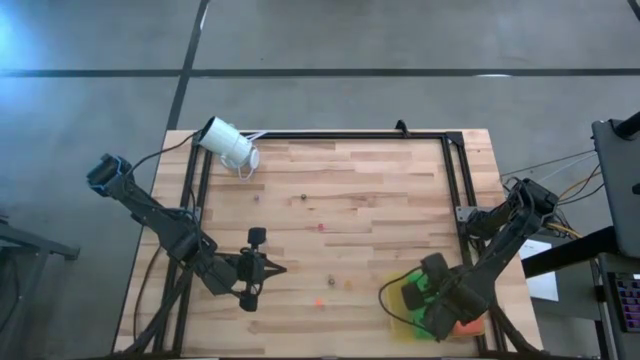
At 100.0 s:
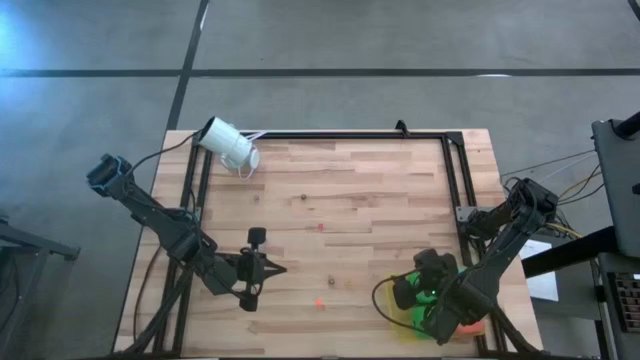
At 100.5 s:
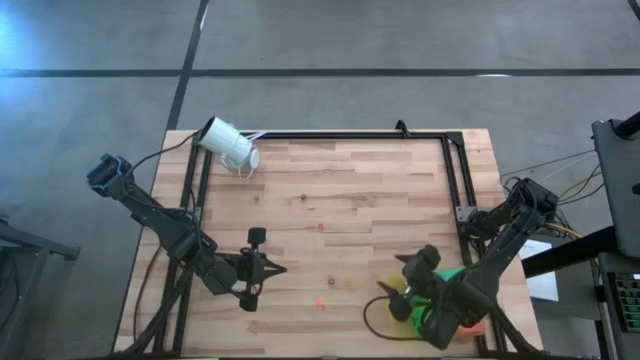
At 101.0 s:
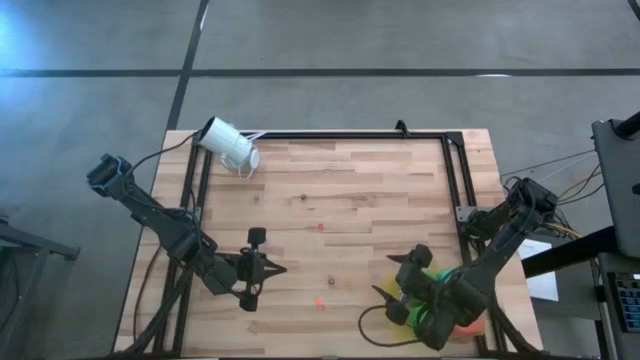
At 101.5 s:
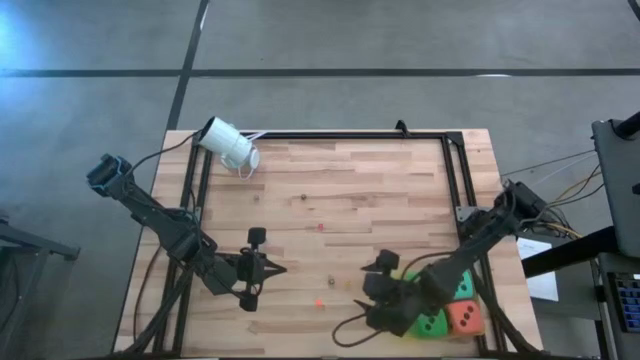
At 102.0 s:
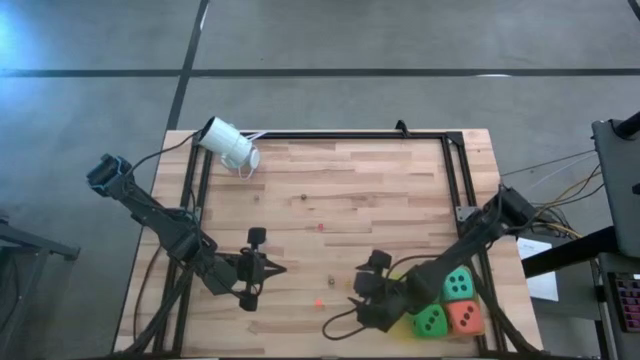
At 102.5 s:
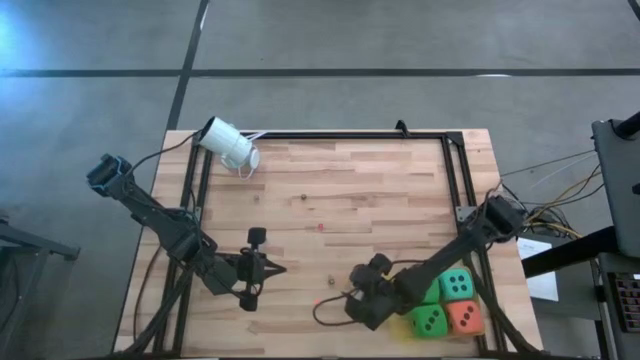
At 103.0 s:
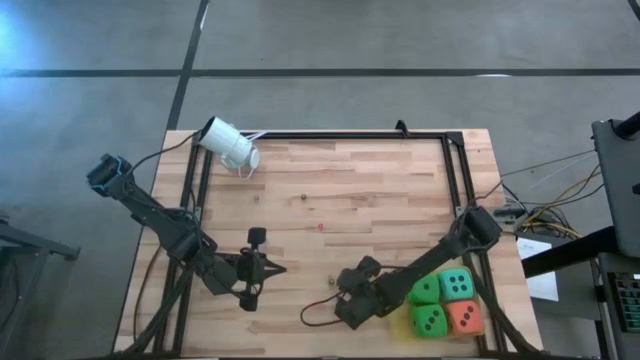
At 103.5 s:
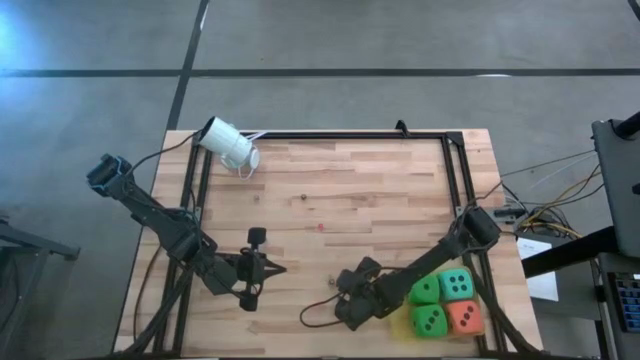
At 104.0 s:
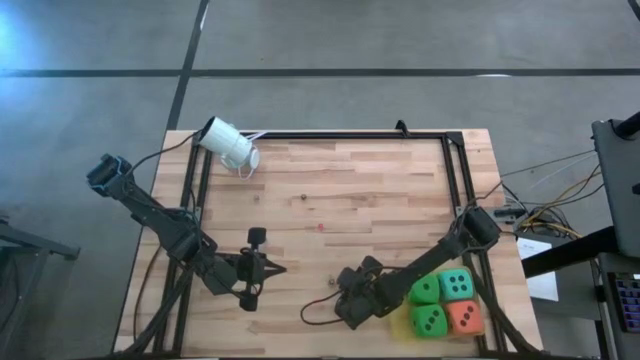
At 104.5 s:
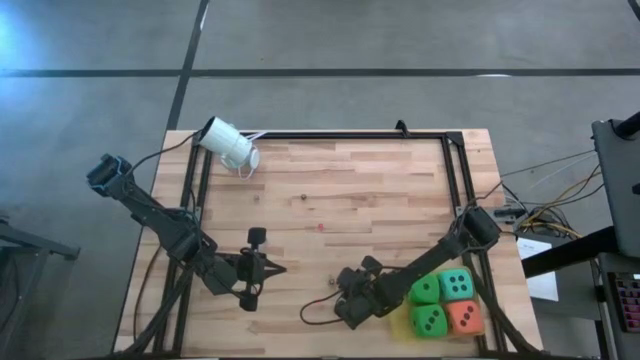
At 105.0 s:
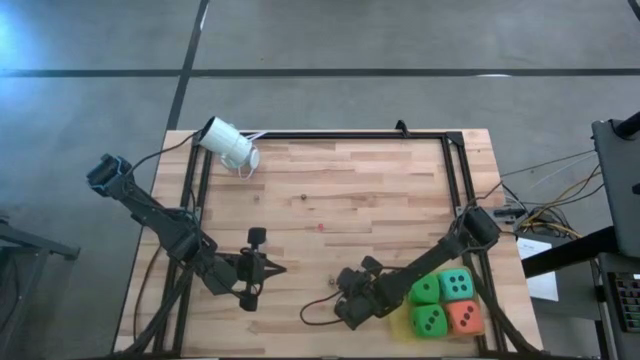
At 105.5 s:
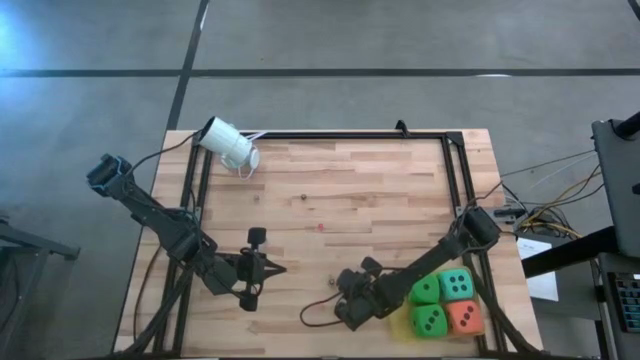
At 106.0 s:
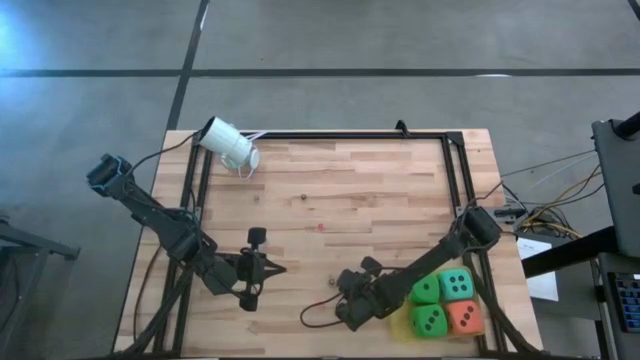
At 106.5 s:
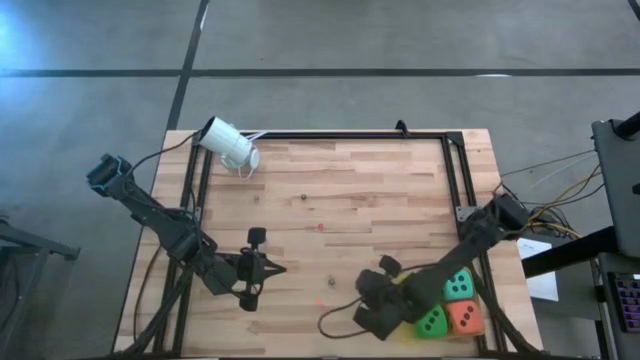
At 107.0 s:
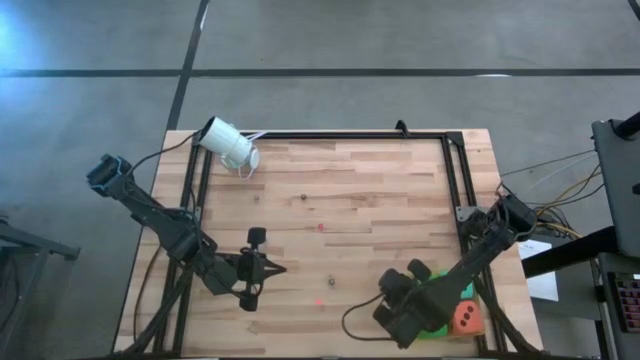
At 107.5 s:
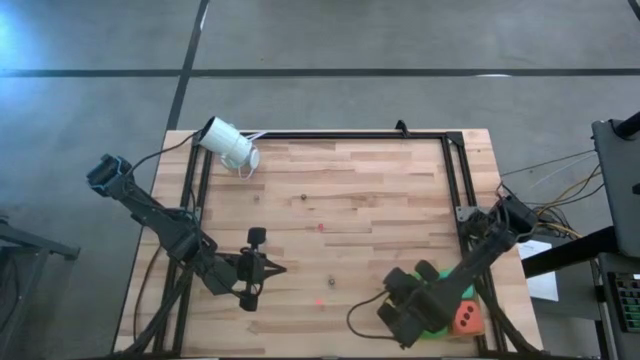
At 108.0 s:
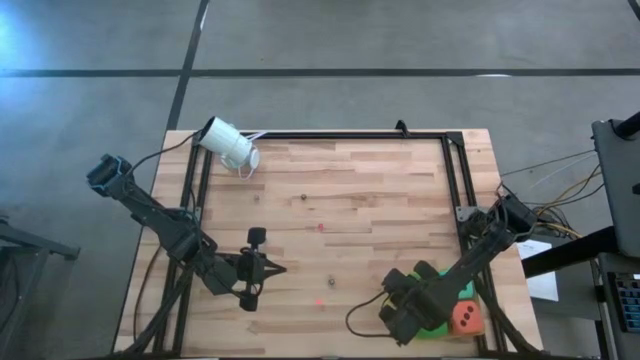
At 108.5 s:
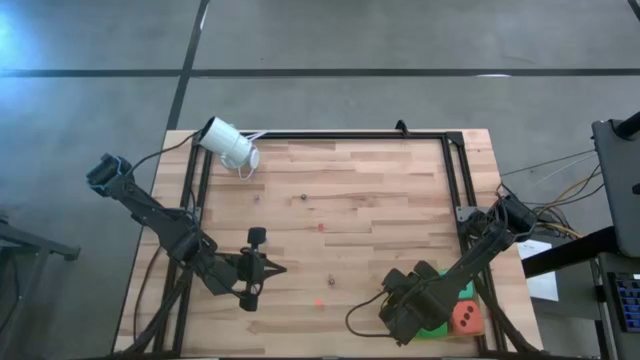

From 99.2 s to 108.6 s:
Task: Pick & Place Dice
Put the small yellow die into the yellow bin

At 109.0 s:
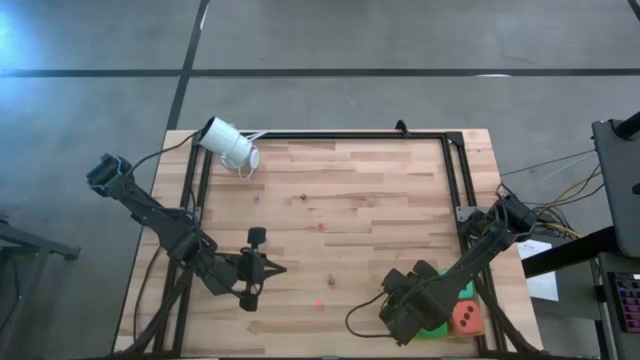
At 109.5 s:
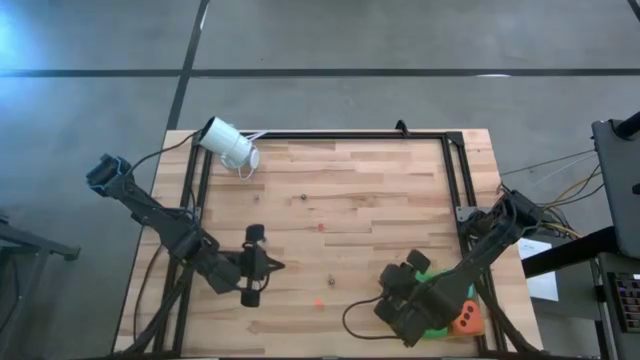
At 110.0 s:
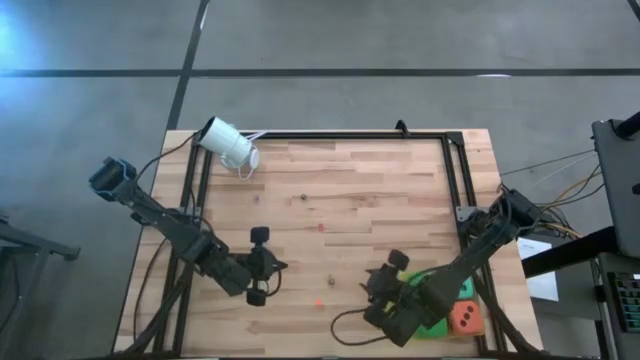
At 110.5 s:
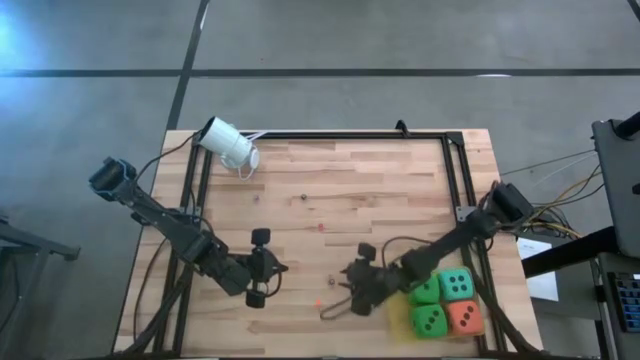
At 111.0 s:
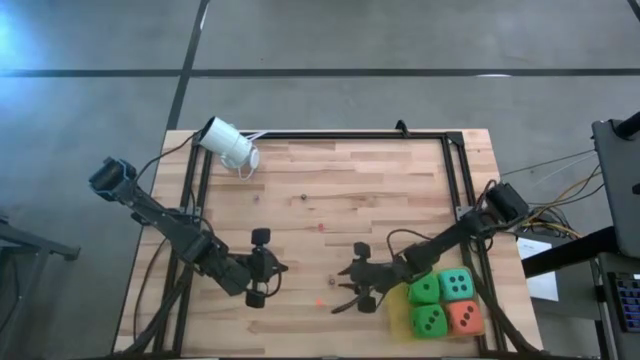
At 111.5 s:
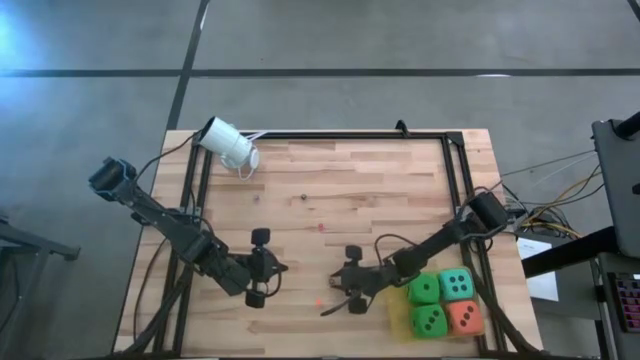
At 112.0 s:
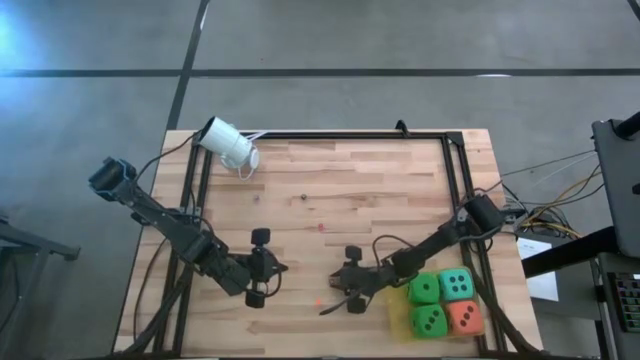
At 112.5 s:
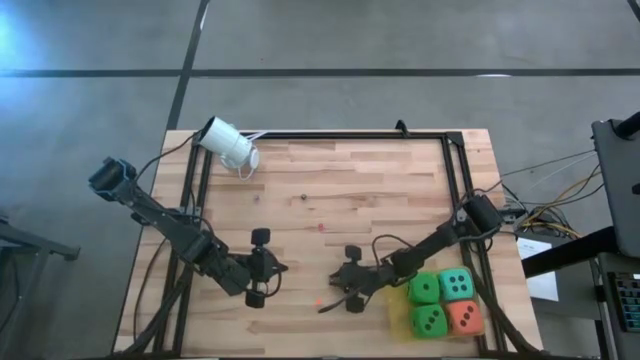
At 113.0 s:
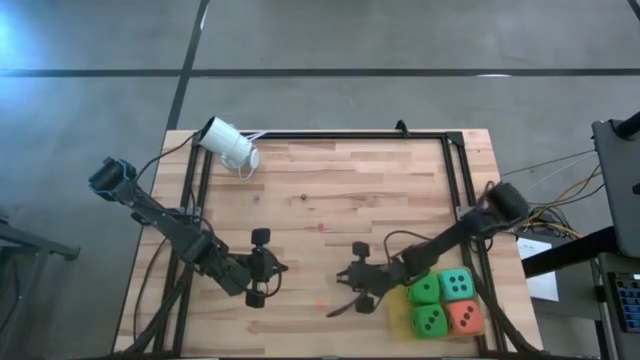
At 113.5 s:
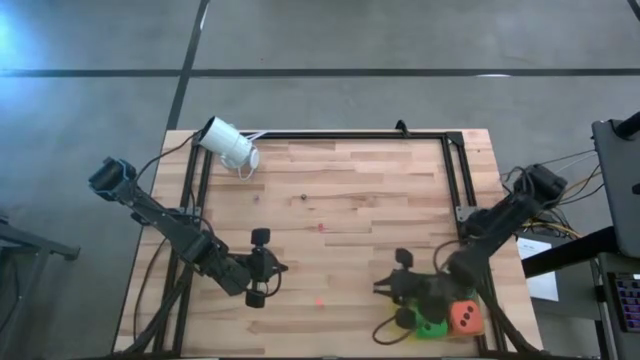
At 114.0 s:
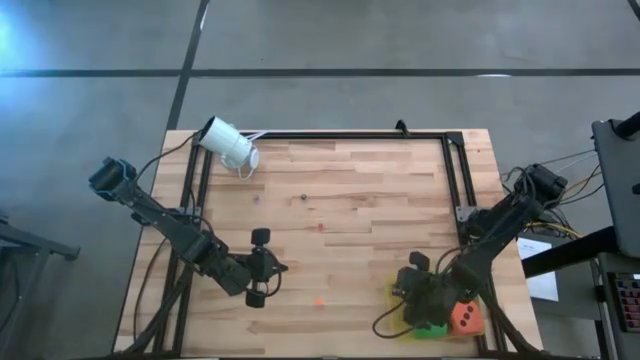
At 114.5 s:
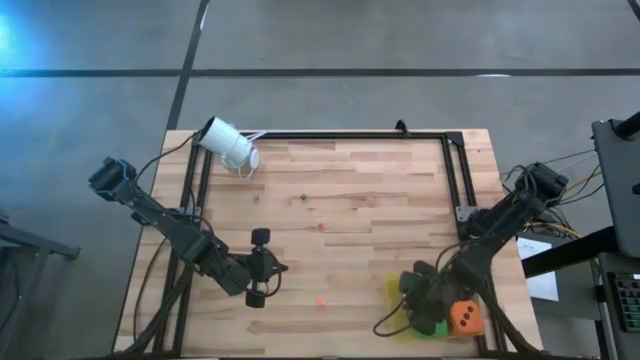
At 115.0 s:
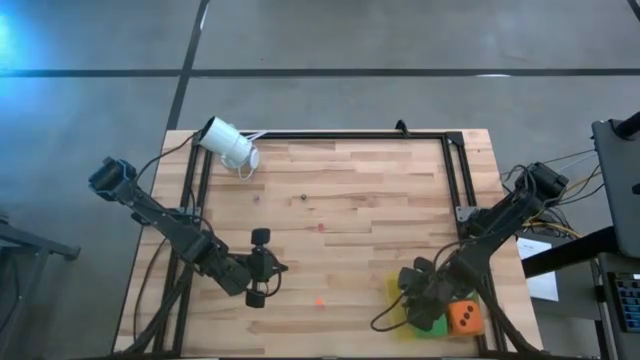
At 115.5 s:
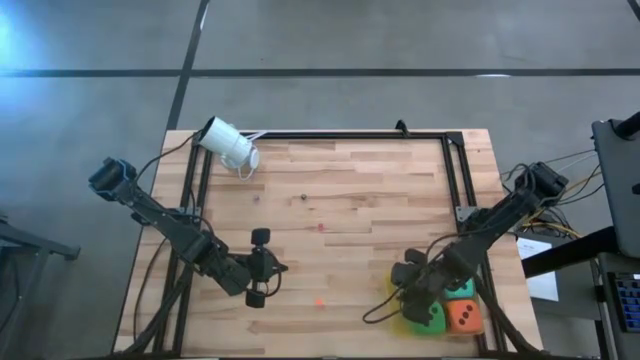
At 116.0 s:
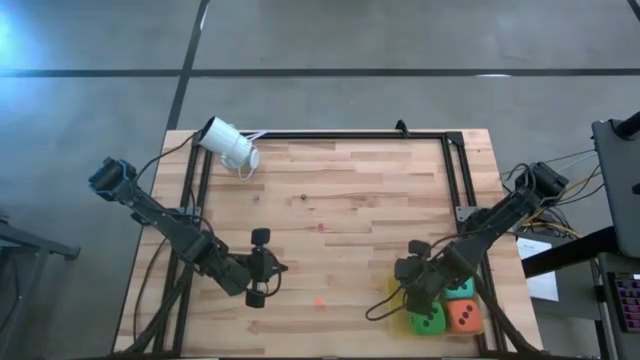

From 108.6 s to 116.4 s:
Put the bottom small black die into the yellow bin

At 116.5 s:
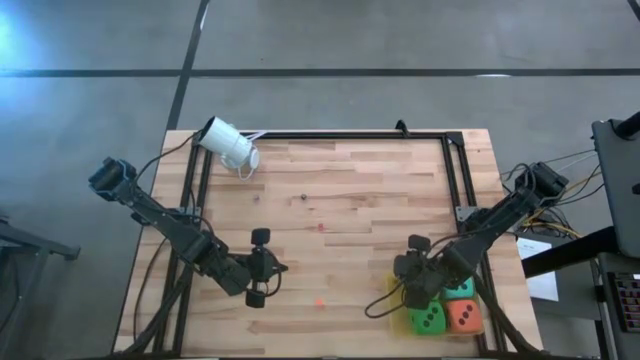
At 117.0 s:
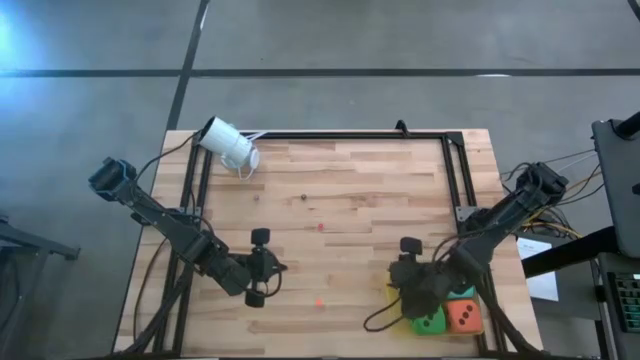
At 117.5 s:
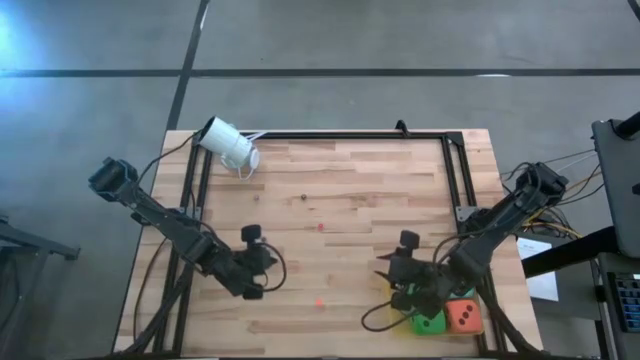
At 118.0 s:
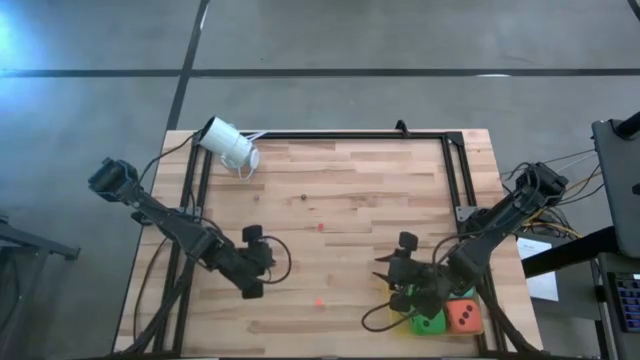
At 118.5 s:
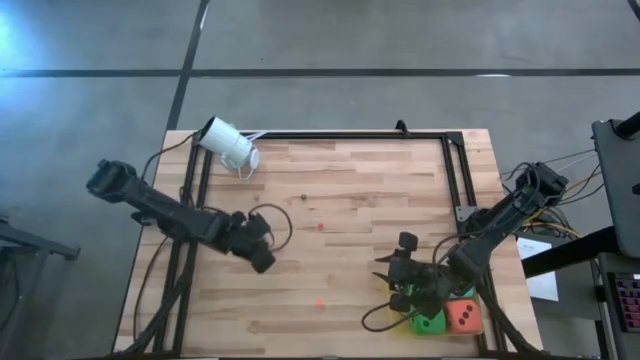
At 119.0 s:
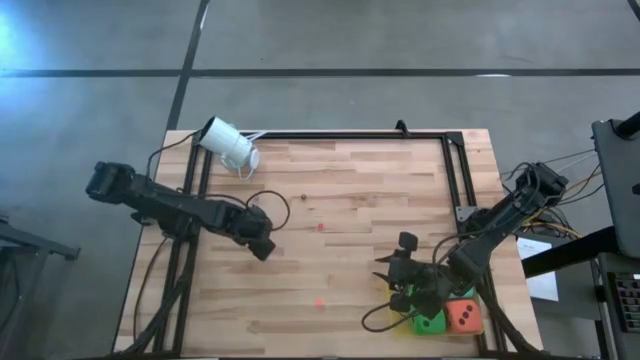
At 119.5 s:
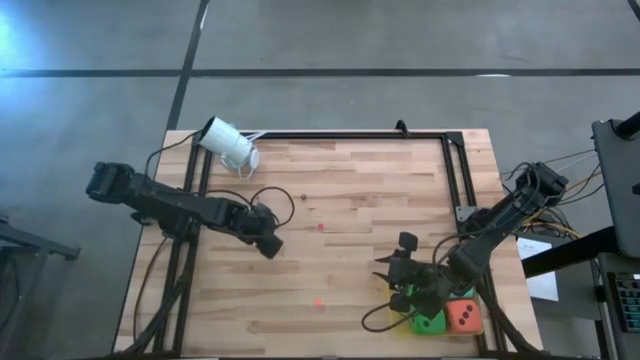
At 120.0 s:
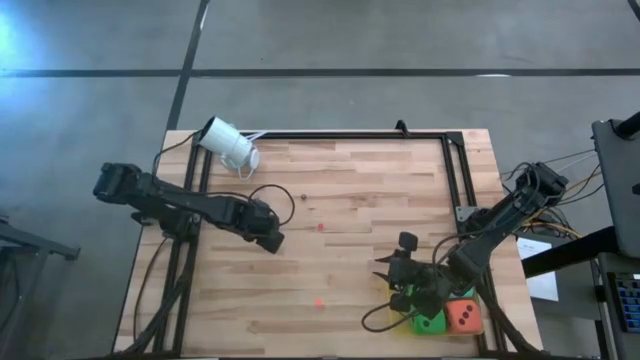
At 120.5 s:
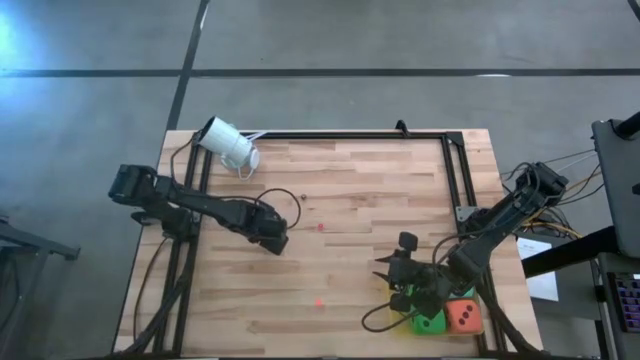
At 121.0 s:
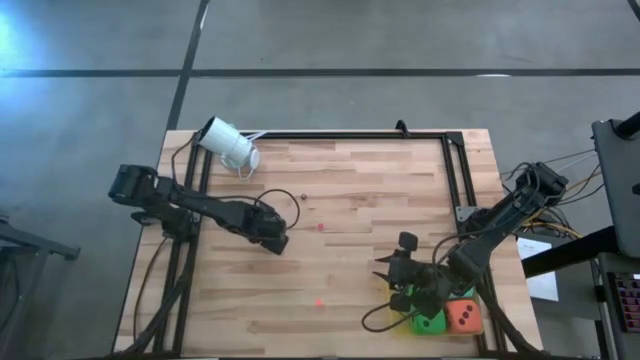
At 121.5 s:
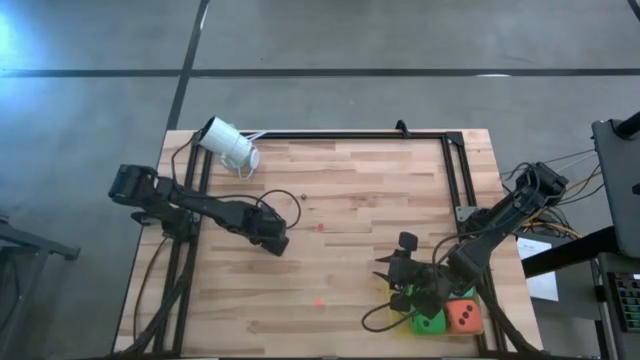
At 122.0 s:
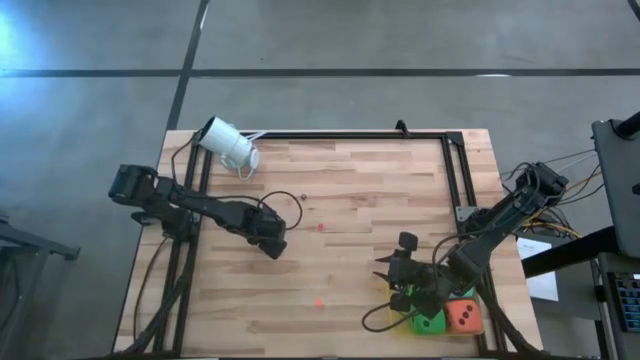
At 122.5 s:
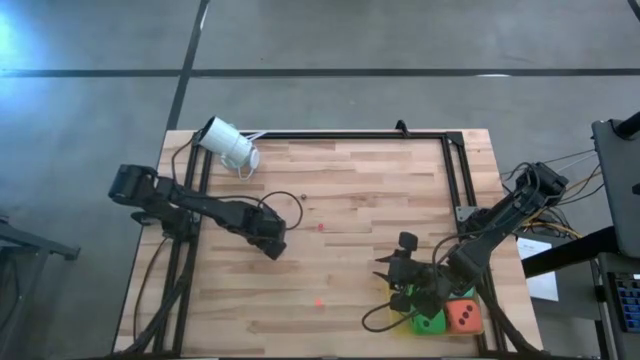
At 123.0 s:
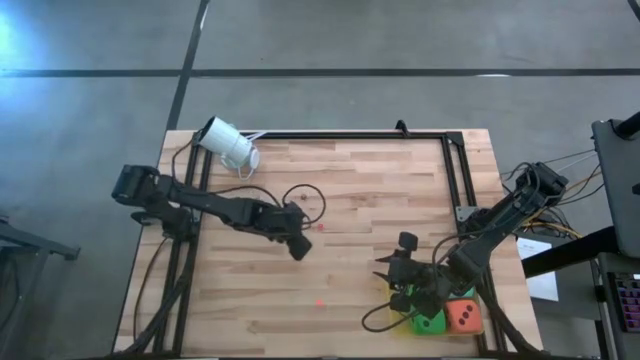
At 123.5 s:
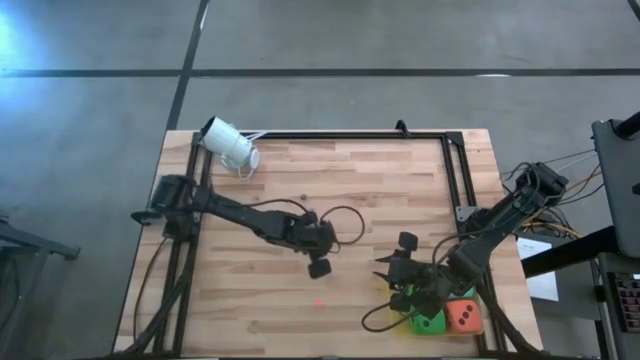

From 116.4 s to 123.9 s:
Put the small blue die into the yellow bin
